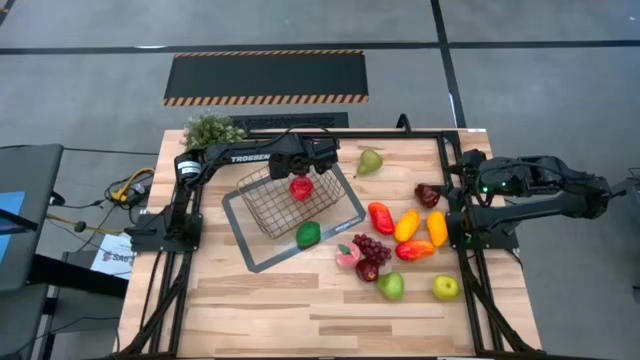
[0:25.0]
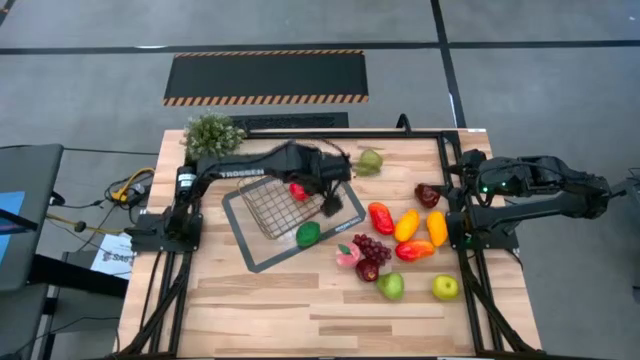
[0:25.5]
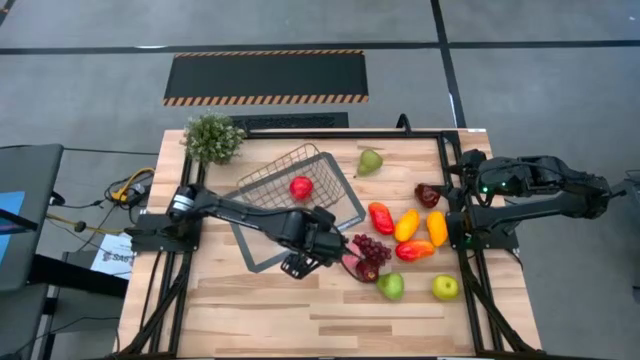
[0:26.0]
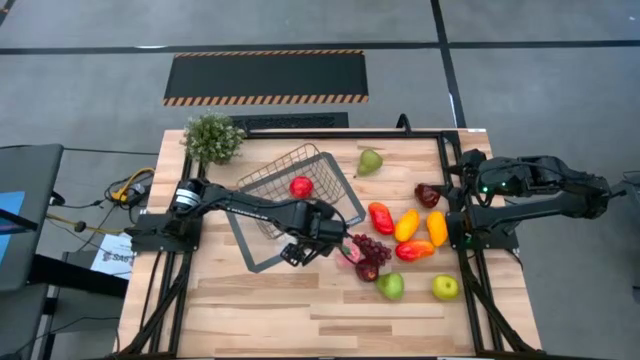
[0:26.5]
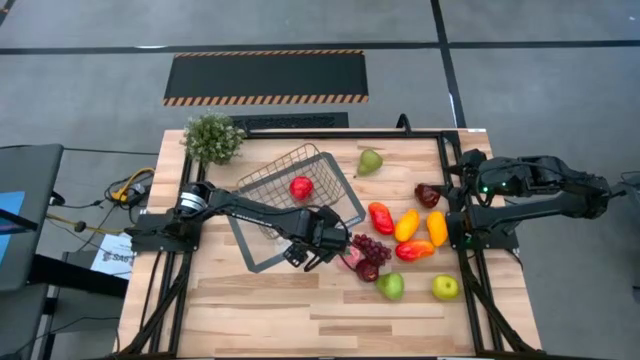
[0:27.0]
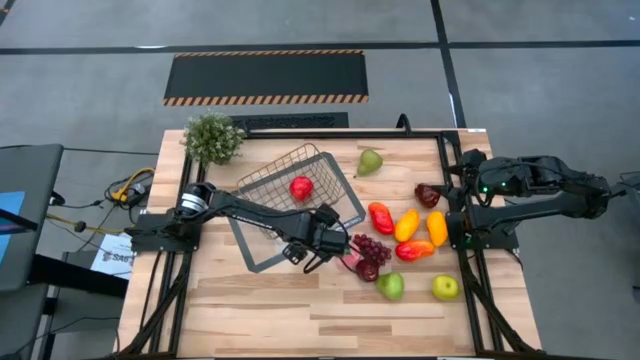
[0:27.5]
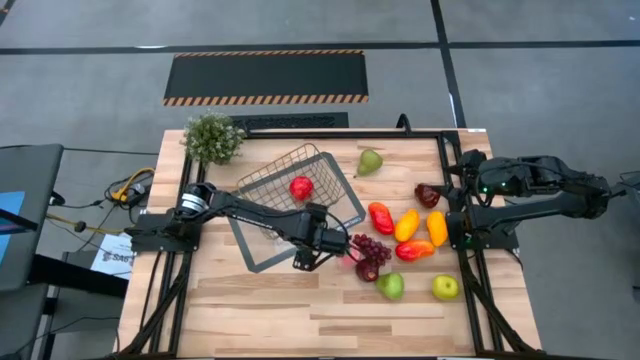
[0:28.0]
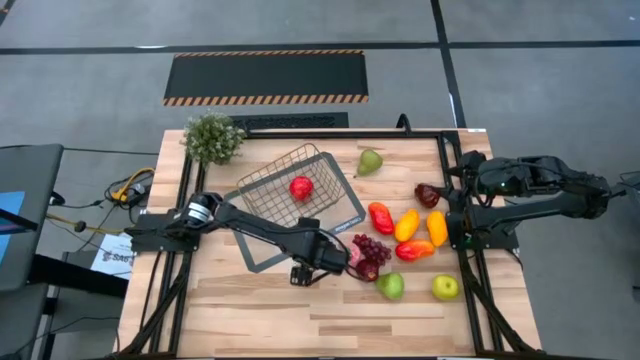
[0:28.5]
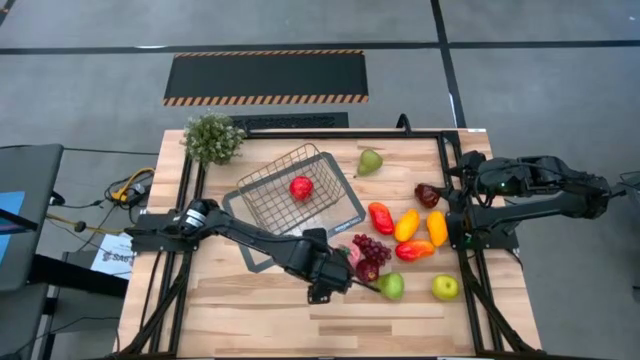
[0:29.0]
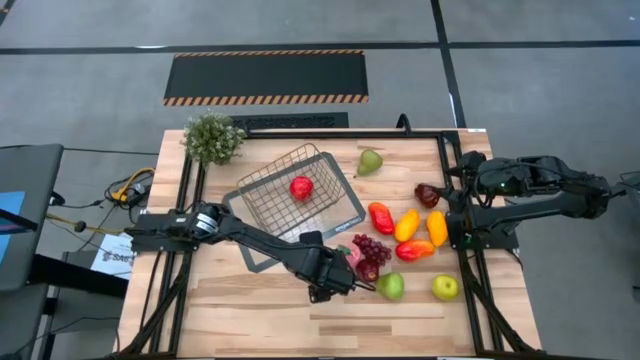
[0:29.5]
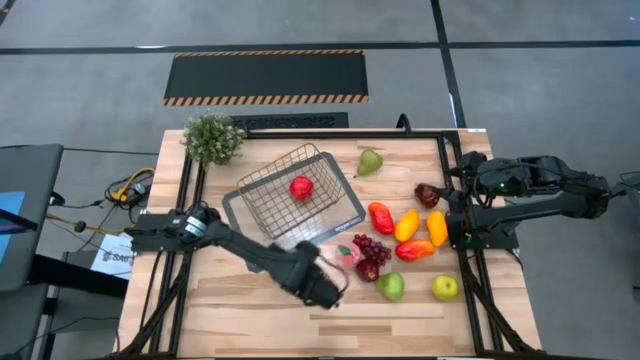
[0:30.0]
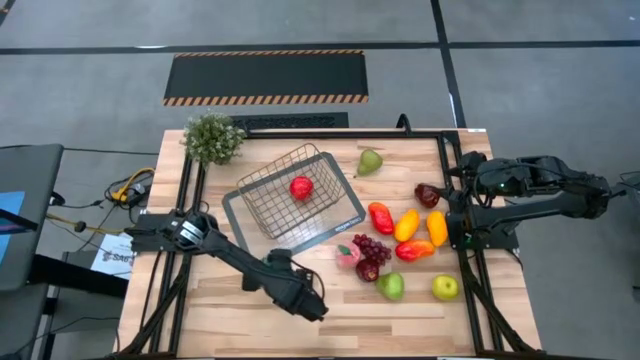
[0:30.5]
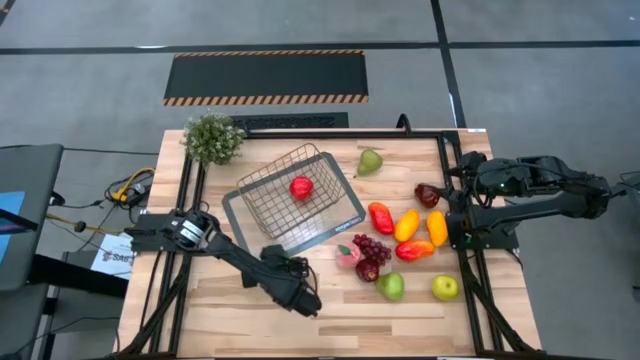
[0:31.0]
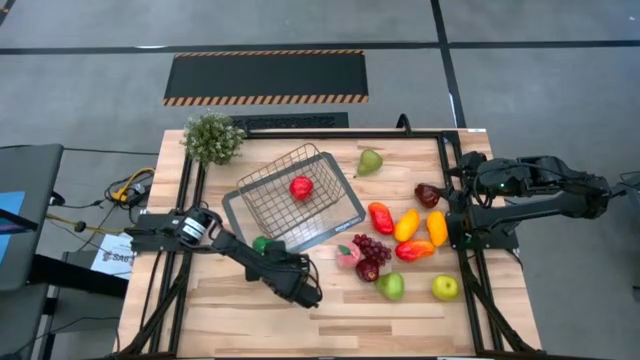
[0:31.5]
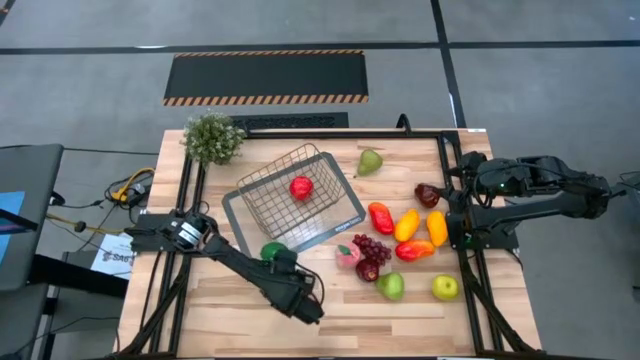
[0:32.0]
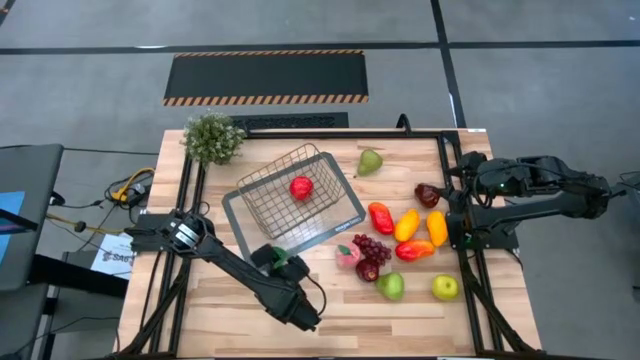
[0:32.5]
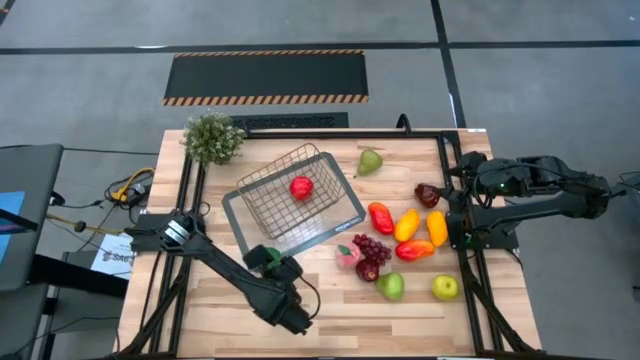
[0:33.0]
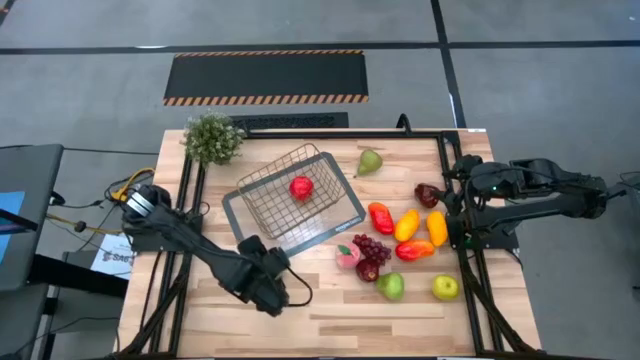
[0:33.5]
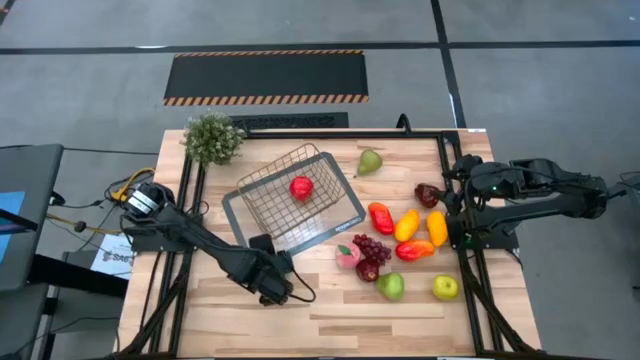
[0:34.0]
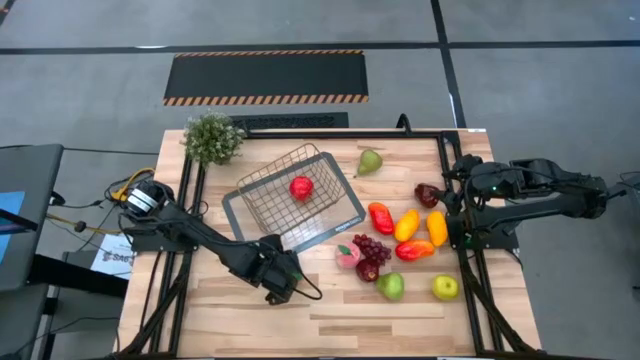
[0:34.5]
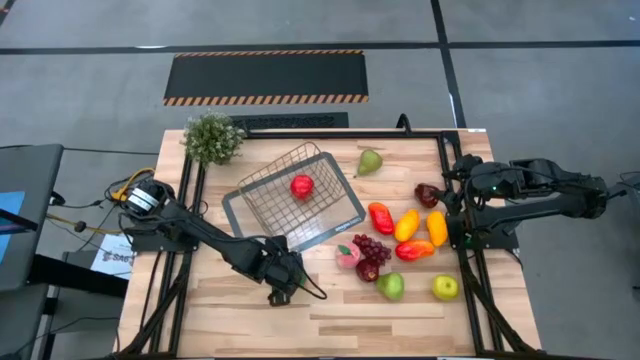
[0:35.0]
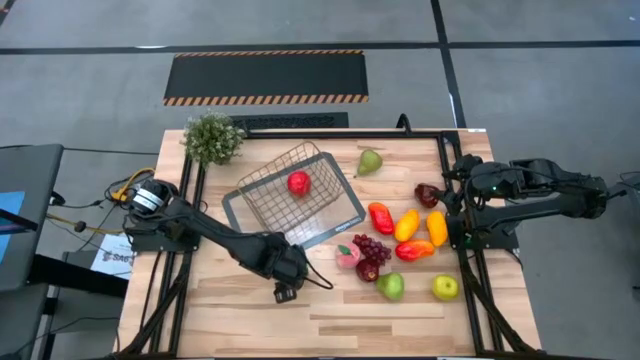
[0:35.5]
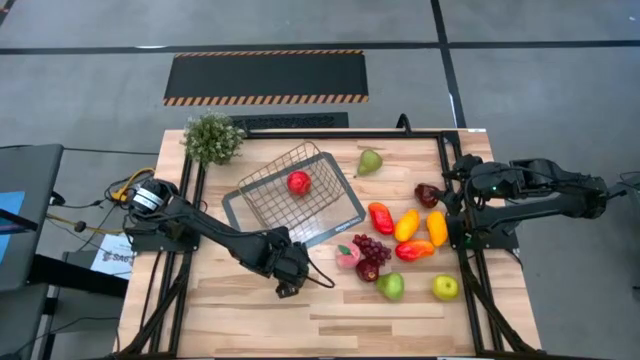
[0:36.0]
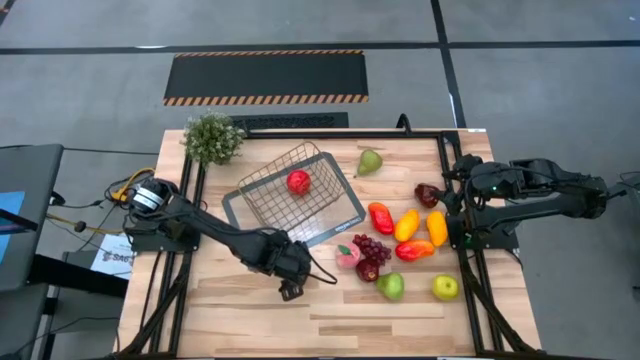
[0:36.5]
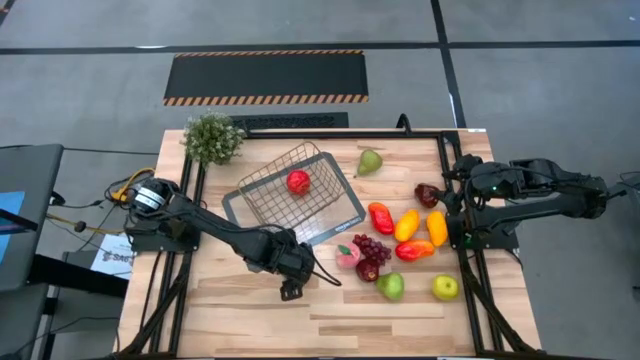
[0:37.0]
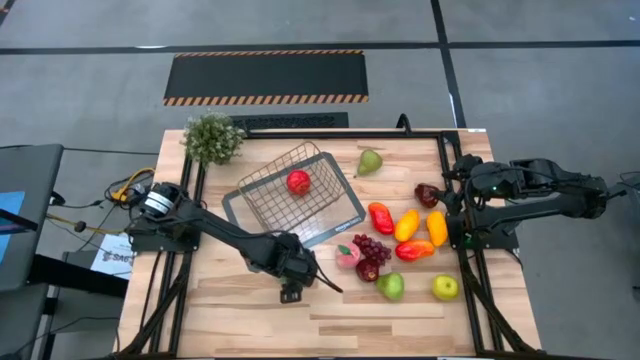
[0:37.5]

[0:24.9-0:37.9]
Task: Build produce basket
Put the green lime into the gold wire basket

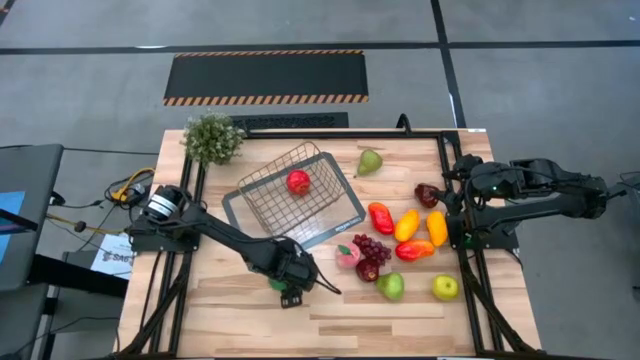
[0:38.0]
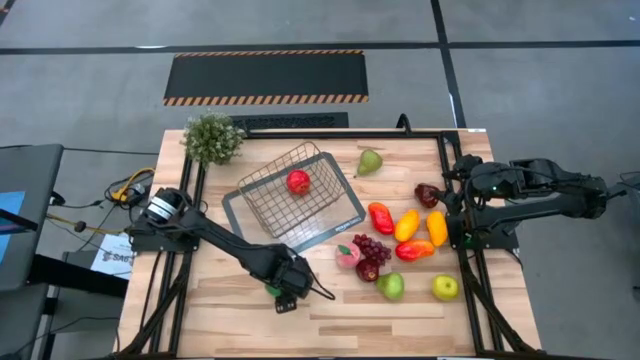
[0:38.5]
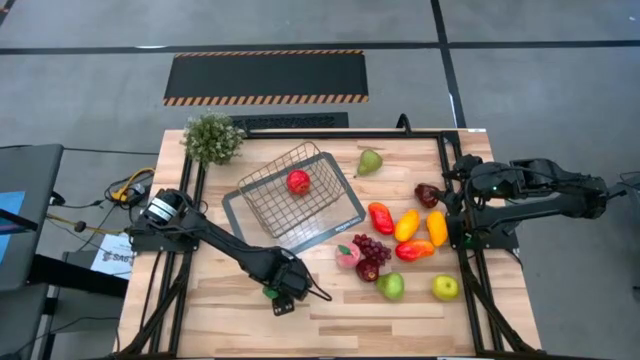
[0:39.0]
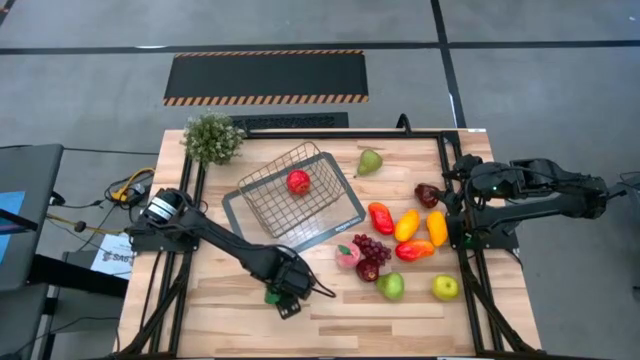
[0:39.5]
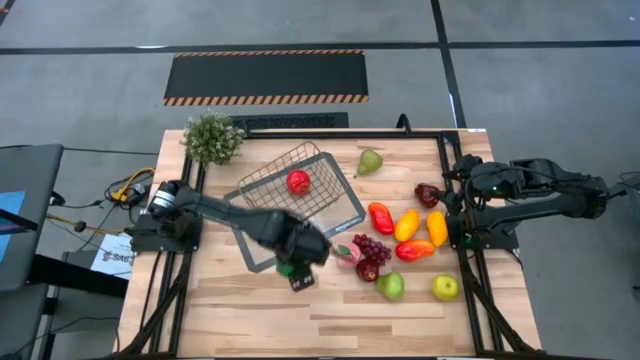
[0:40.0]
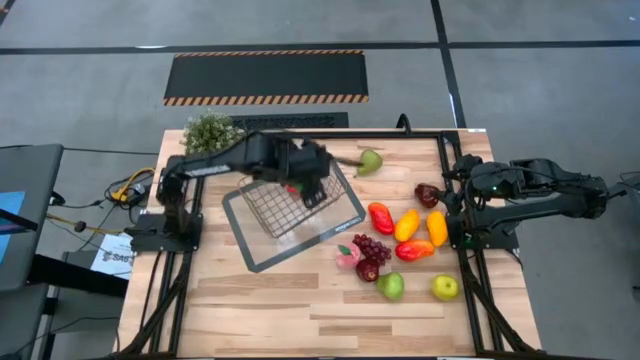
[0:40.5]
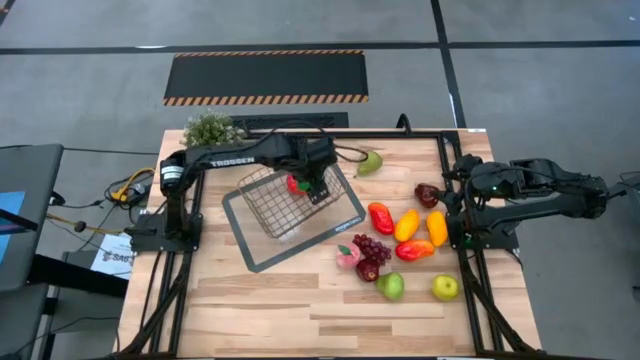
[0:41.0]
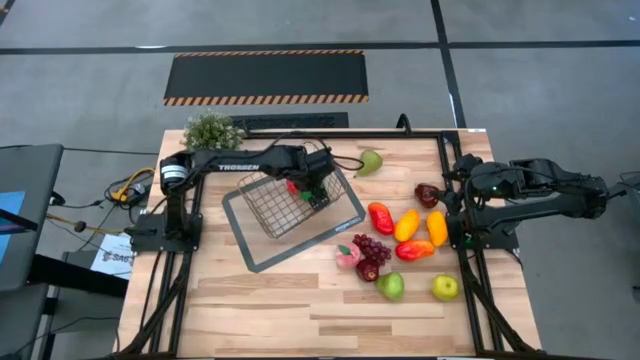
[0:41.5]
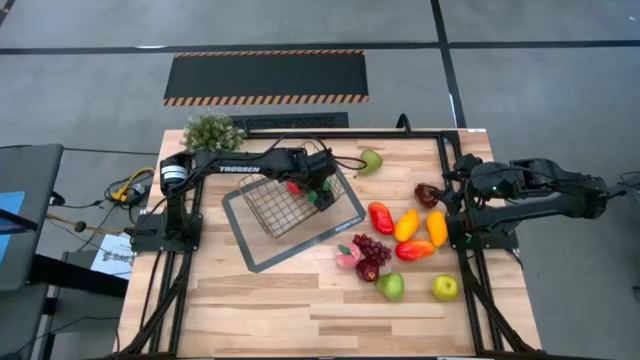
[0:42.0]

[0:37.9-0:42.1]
Put the green lime into the gold wire basket

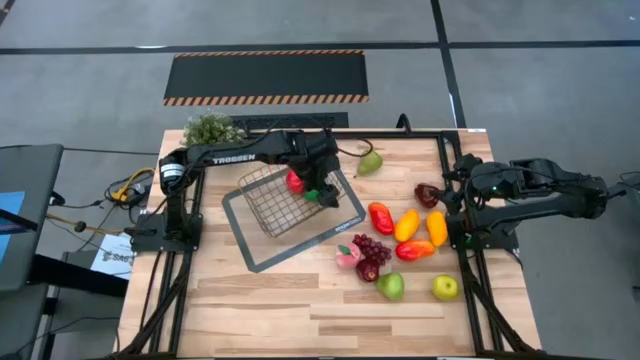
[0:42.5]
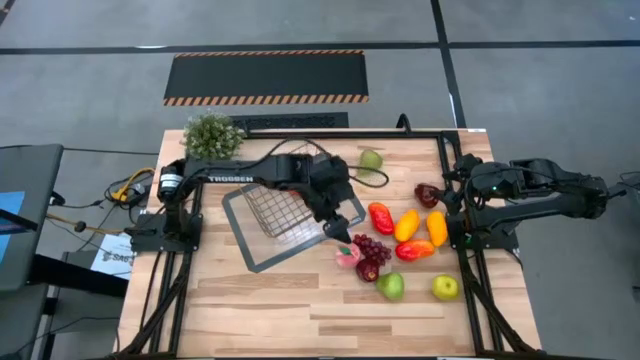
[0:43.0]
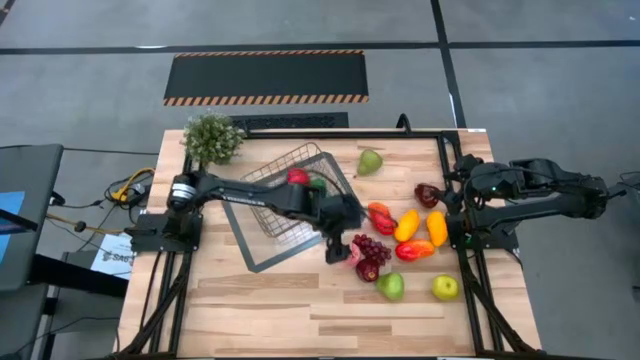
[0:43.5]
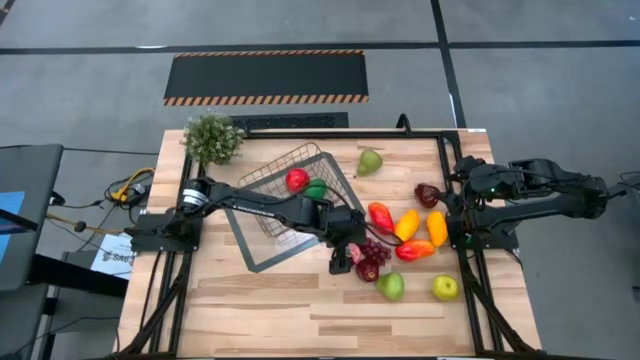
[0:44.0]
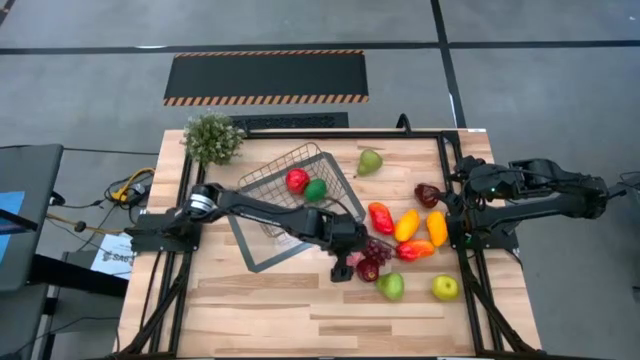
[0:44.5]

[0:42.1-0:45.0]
Put the pink peach into the gold wire basket

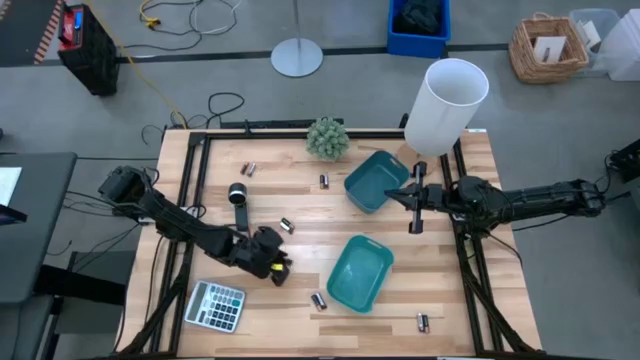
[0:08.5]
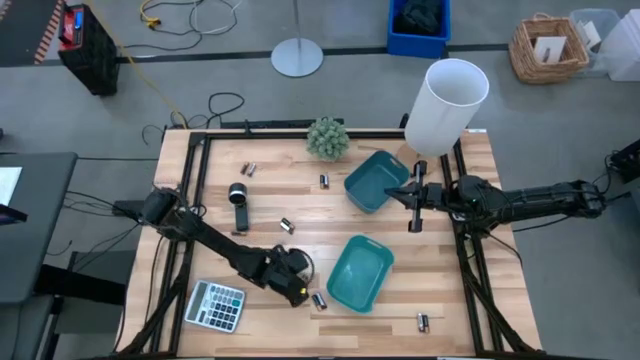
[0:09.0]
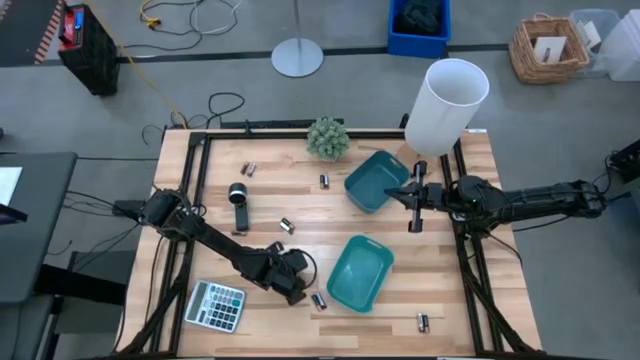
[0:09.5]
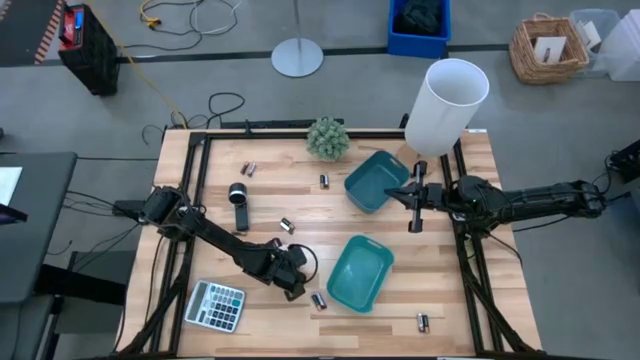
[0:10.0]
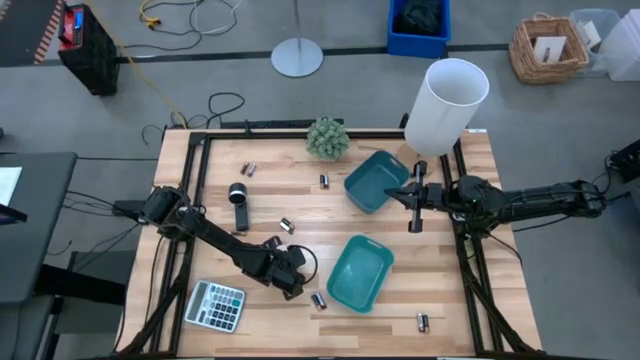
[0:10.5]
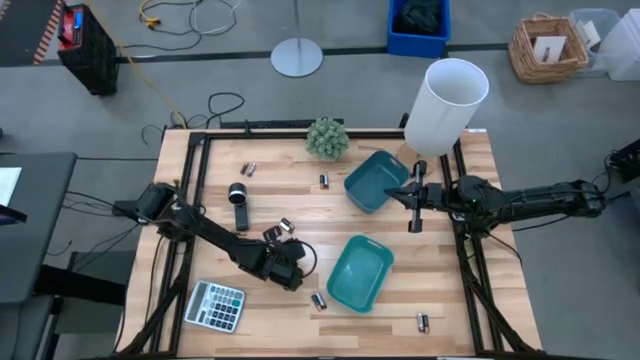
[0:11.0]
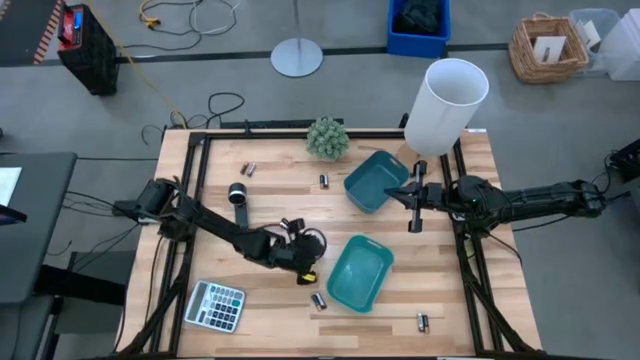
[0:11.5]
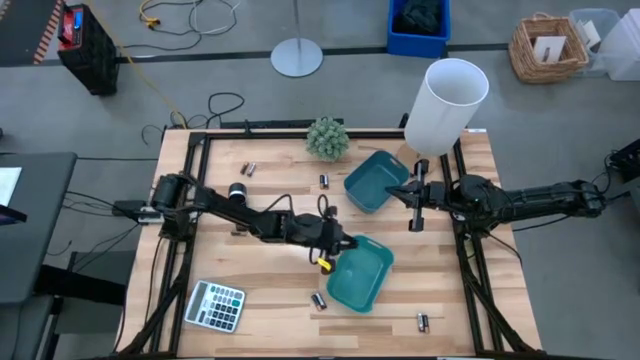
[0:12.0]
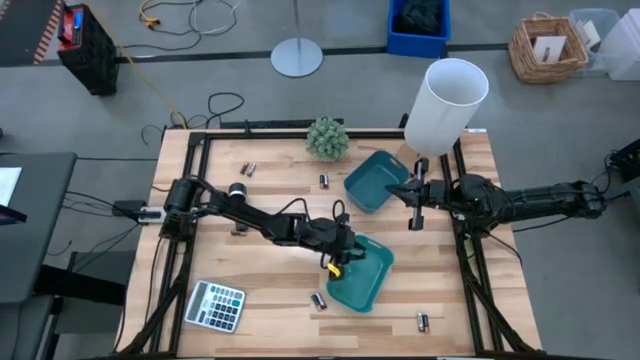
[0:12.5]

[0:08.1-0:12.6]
Task: Sort batteries
Put the silver battery into the green bin
